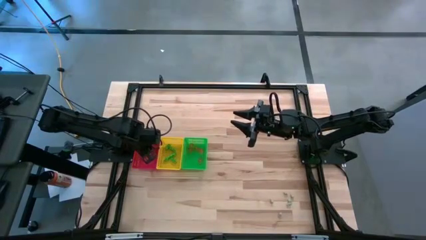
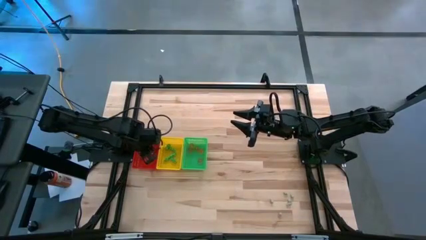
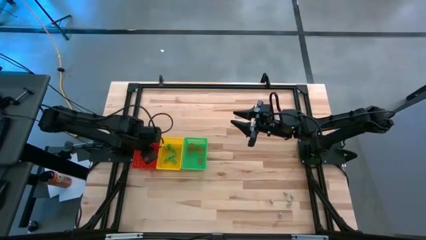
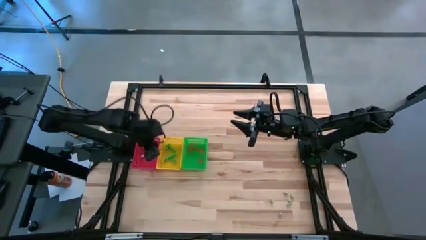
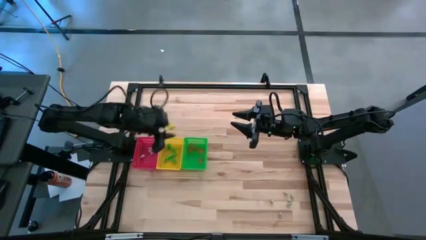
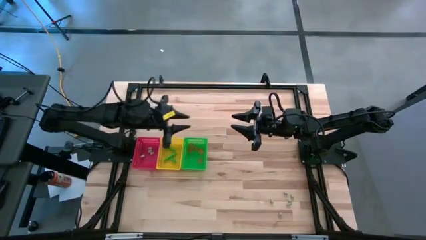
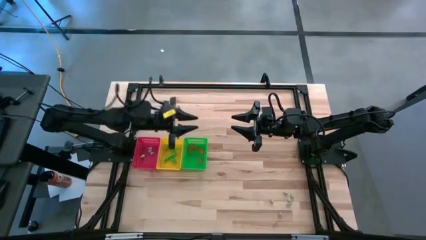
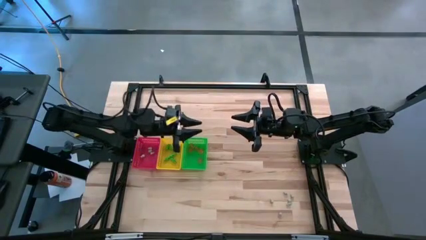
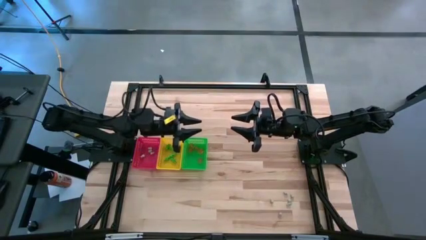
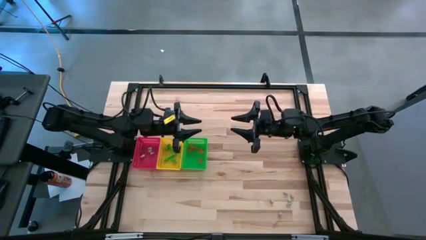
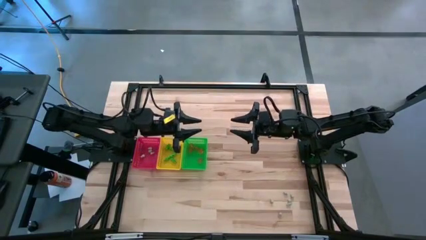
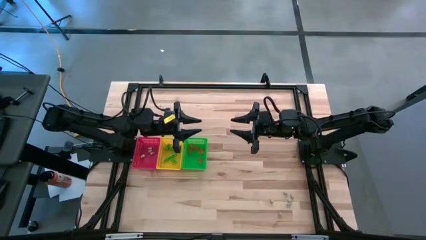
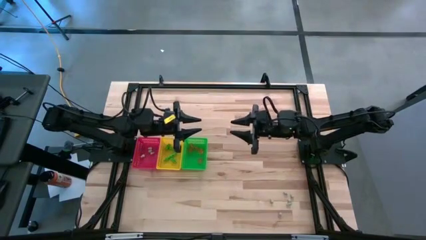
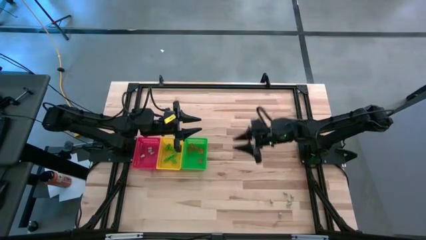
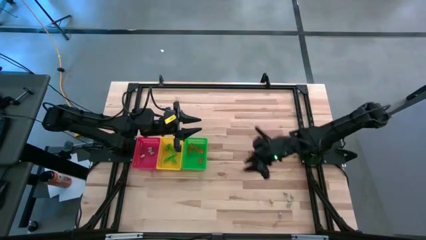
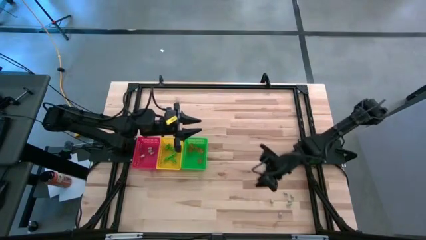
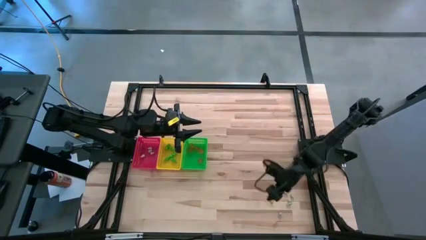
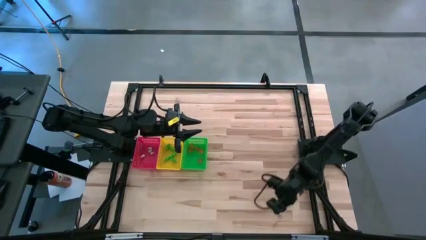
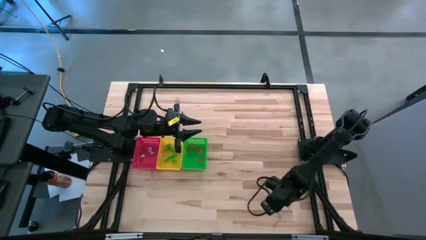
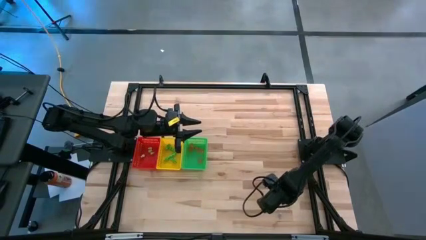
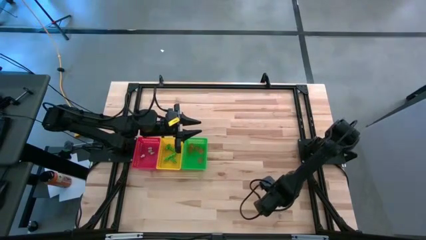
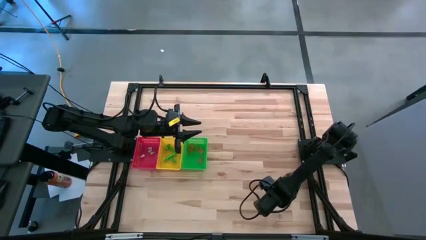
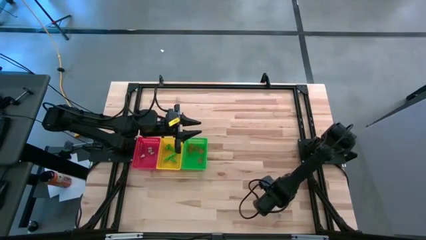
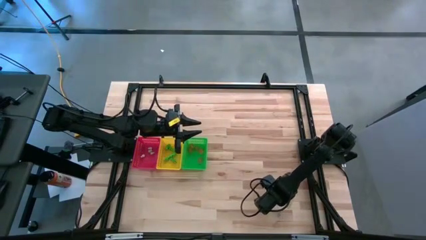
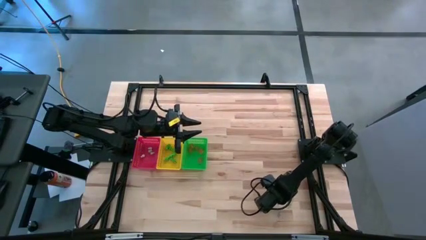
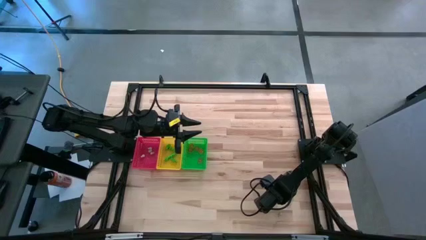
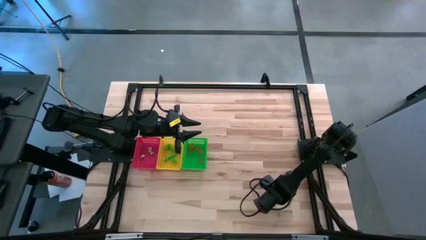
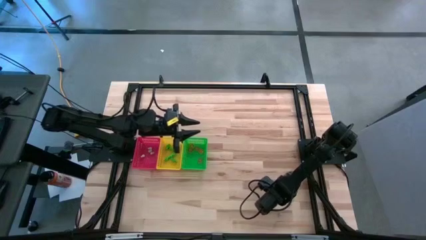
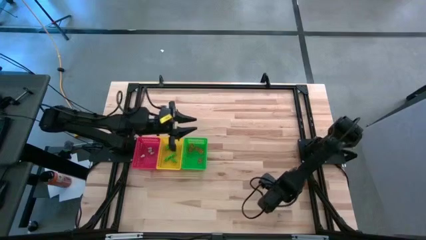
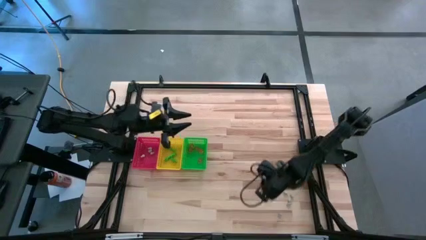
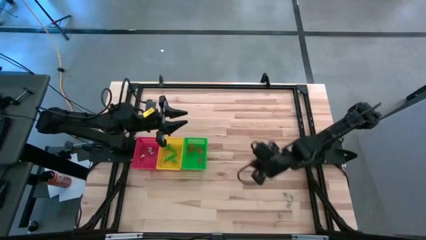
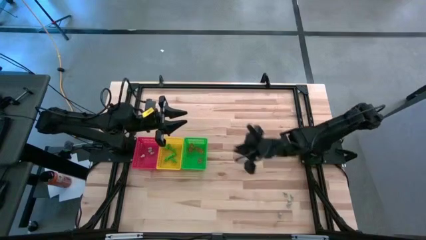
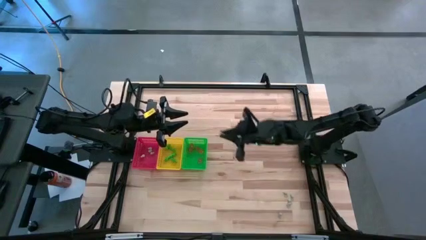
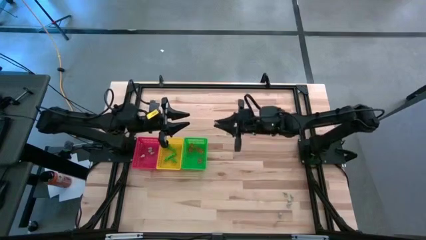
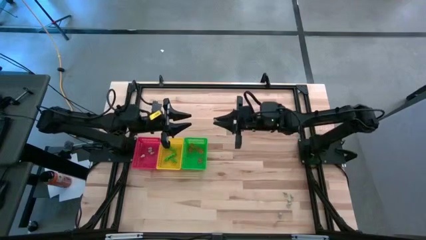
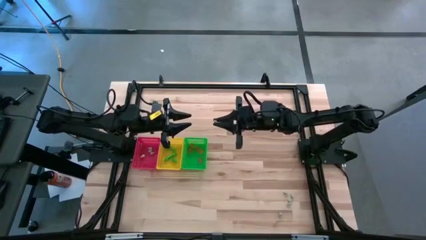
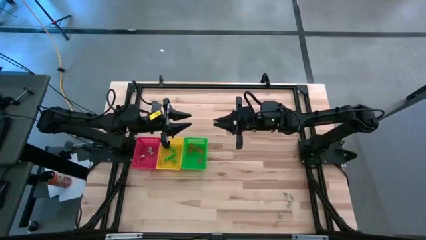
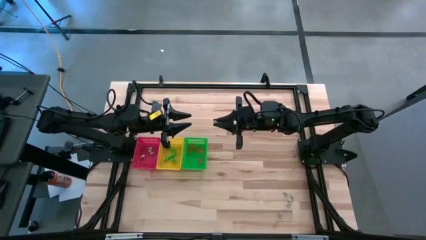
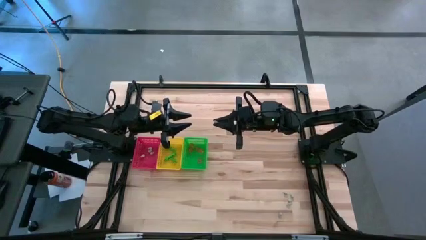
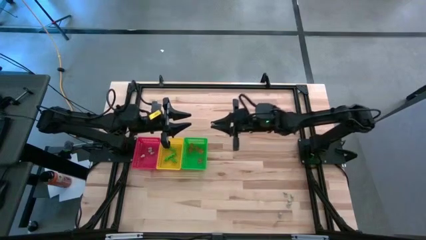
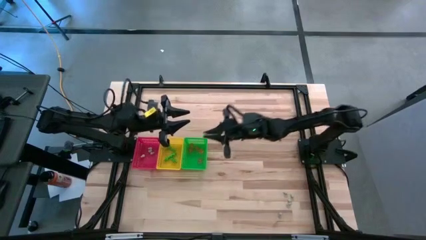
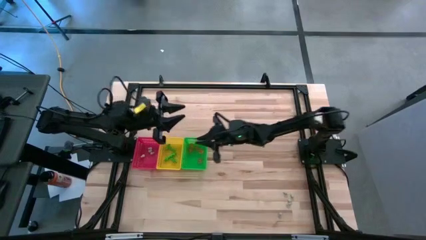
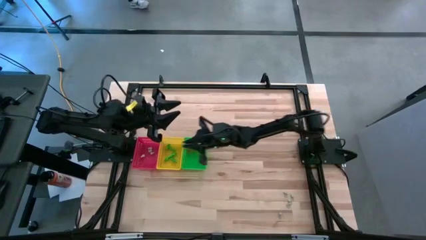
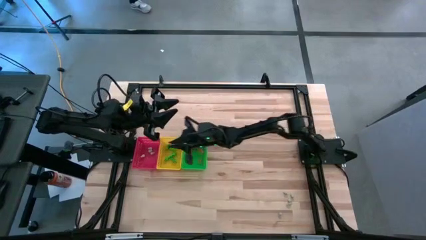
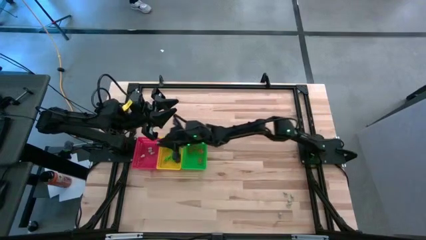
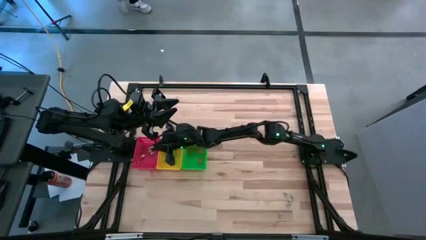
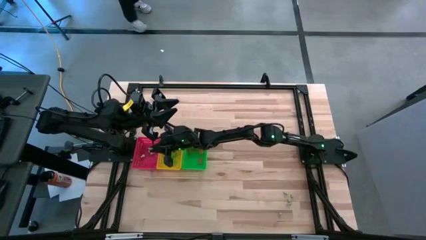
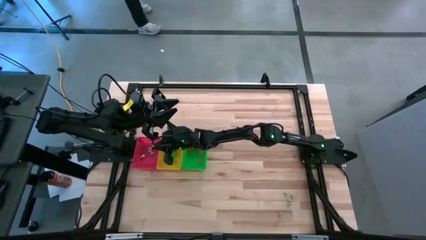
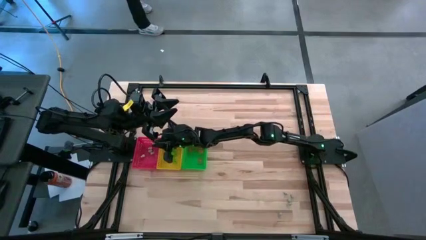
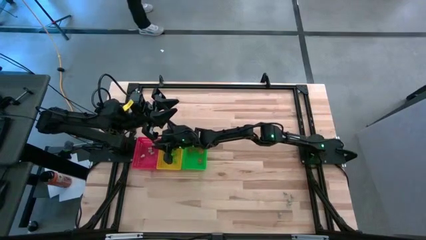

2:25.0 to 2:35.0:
Task: Sort Halloween decoration
Put the white skull toy into the red bin

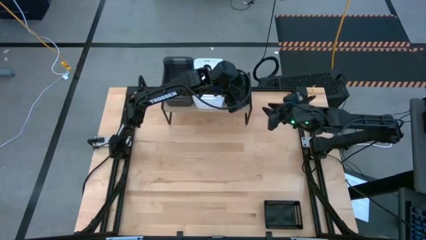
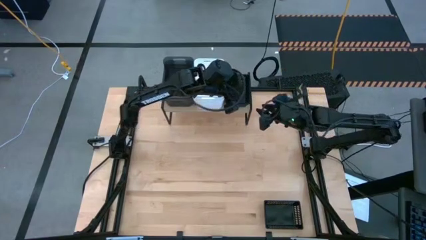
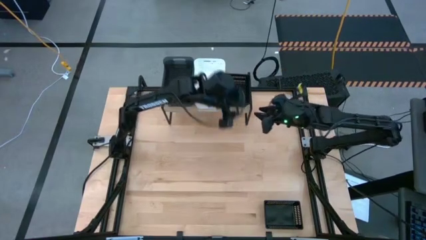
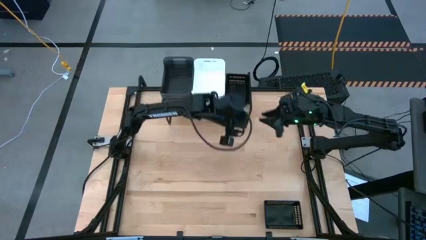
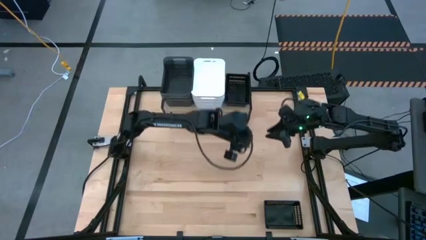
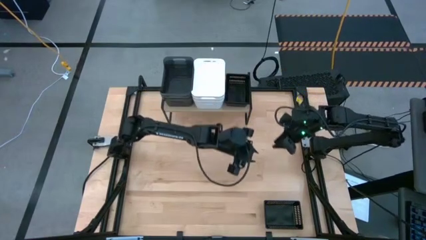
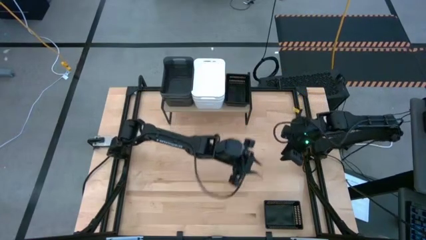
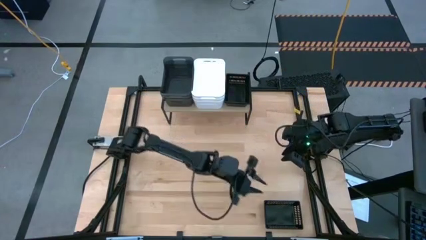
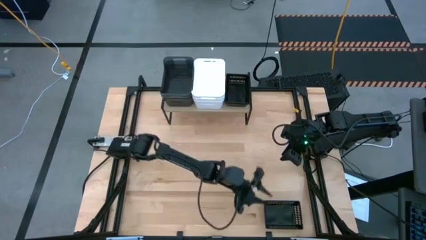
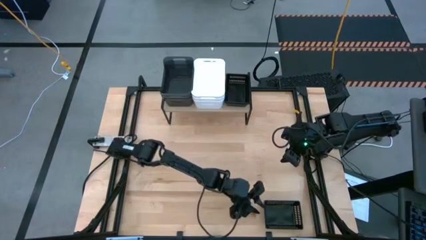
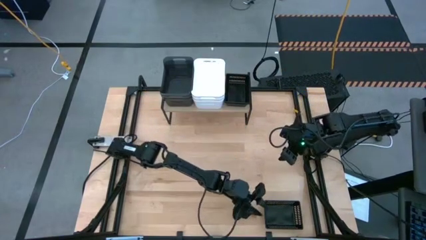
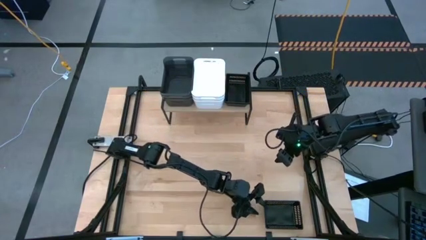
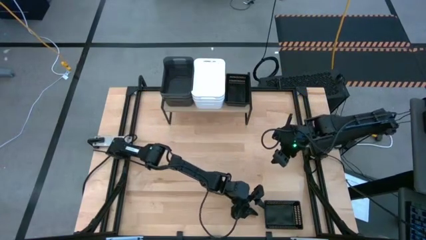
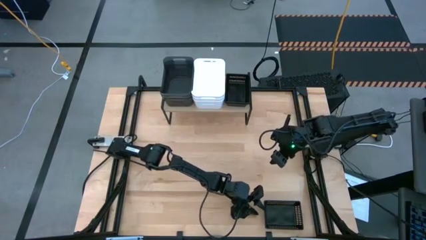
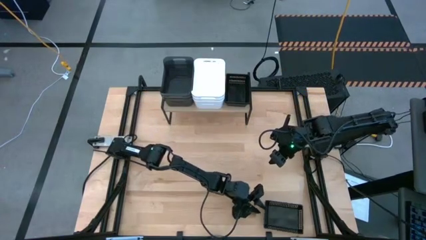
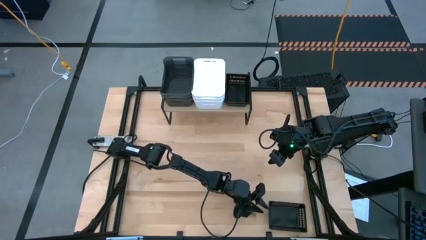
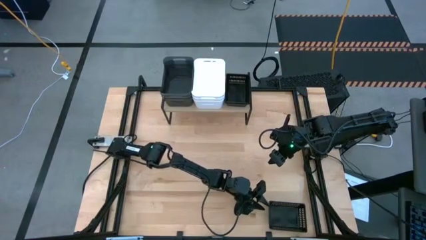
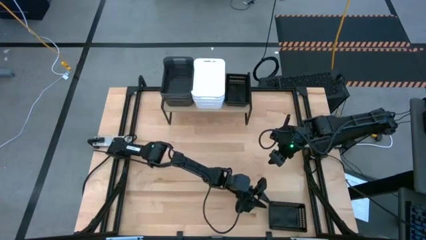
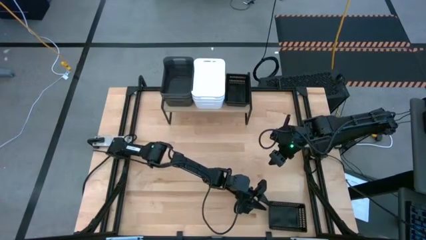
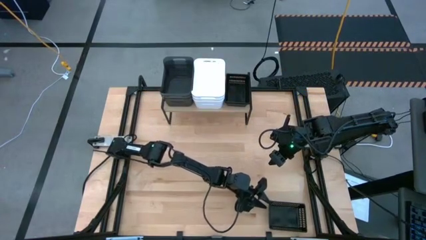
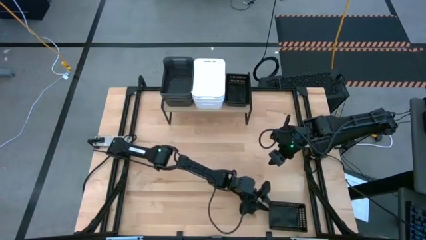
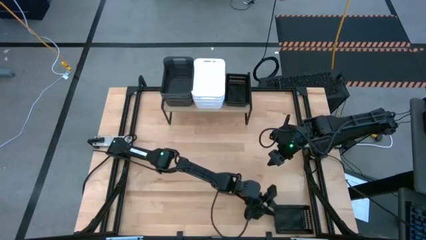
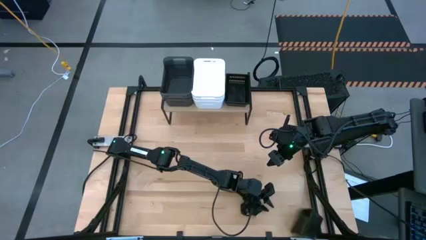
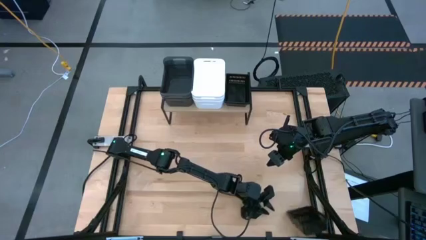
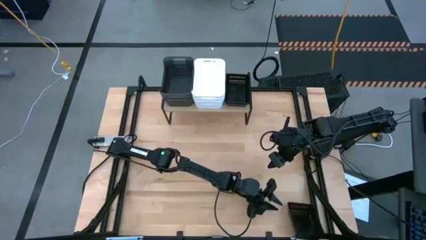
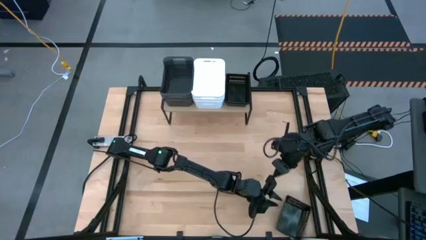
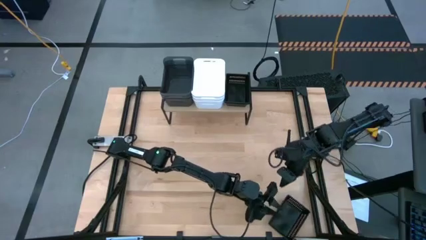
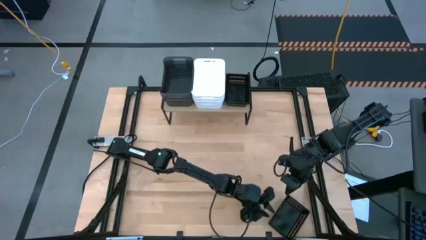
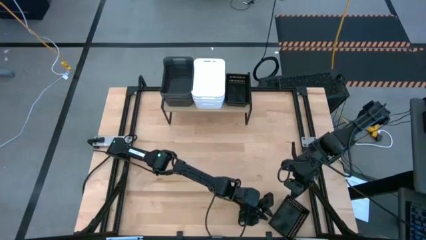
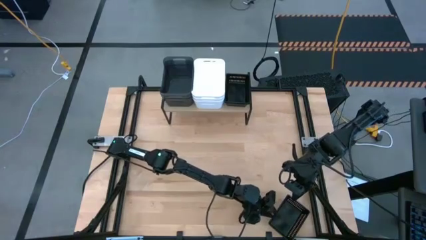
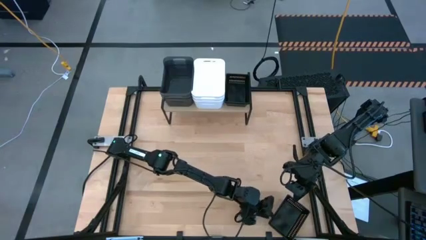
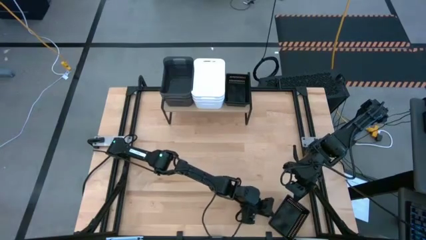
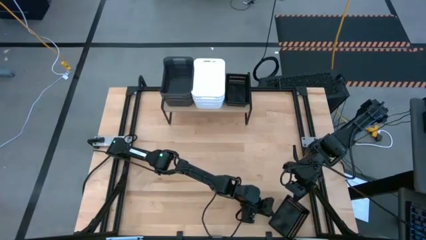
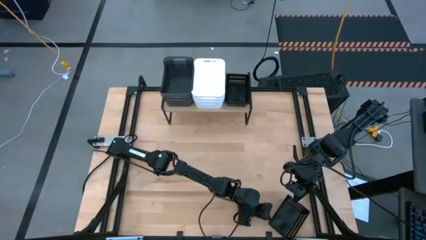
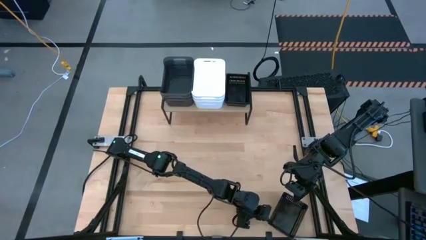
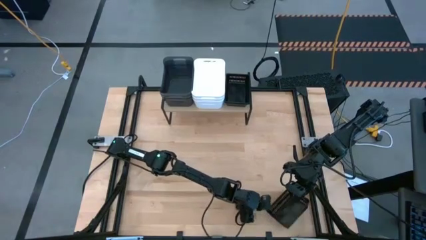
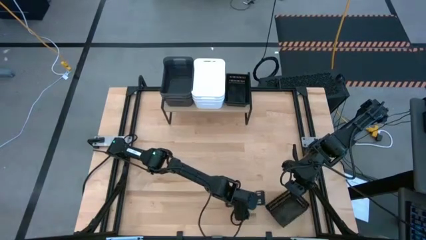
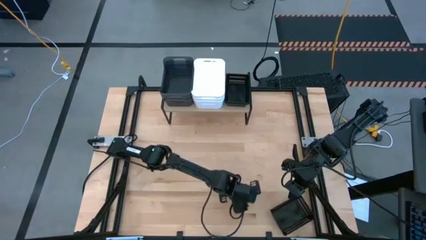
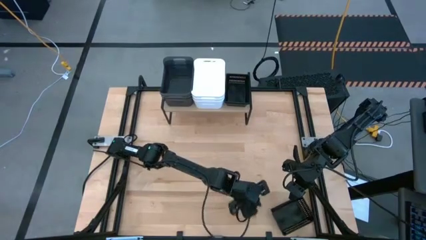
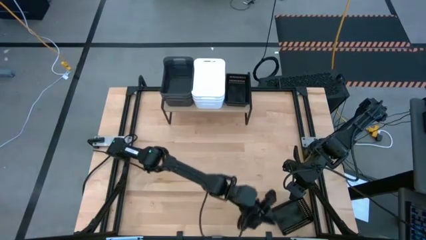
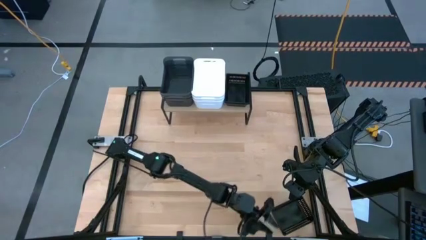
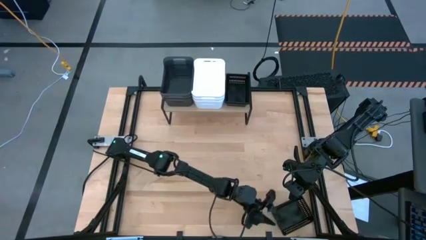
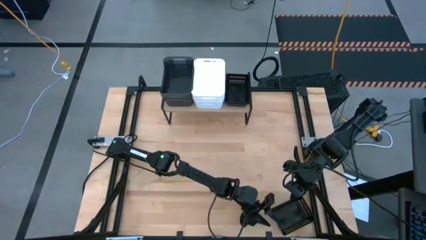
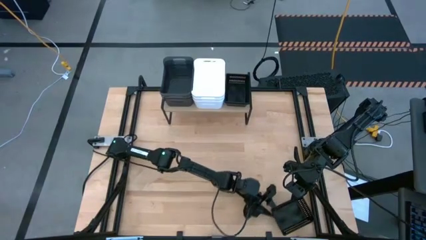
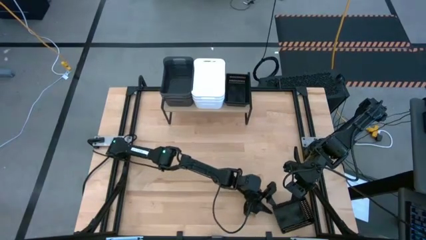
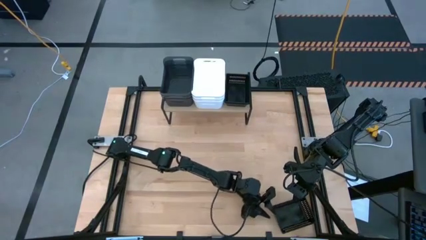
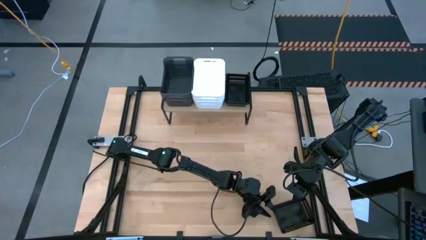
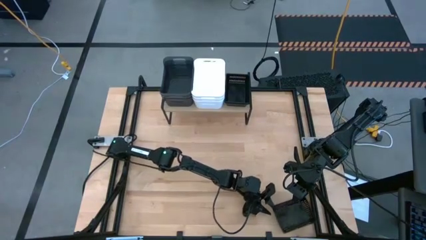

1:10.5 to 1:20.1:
Task: Stack baskets on shelf by color
Stack the black bin on top of the black bin on the shelf
